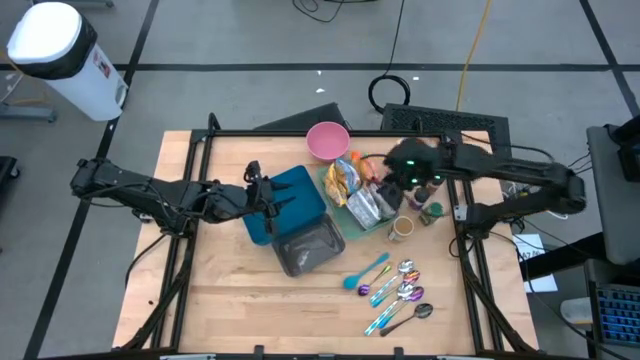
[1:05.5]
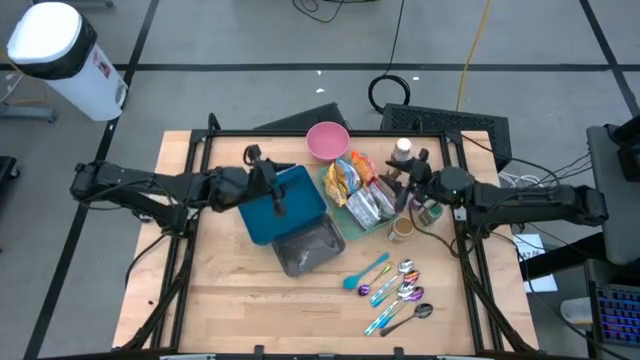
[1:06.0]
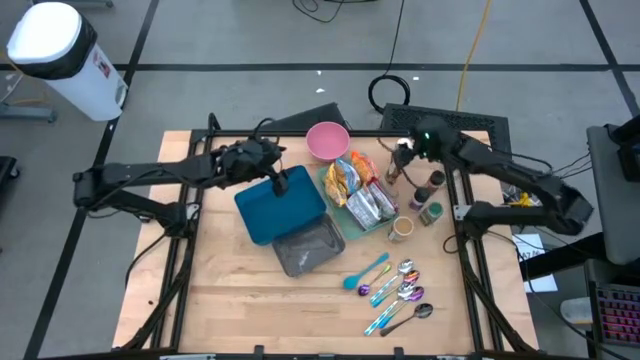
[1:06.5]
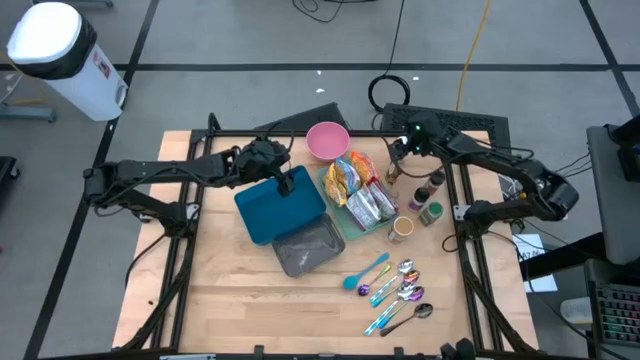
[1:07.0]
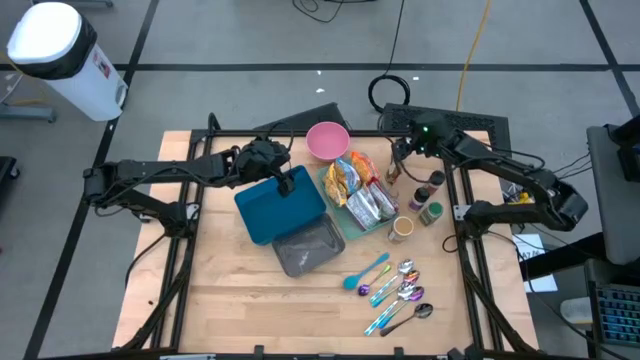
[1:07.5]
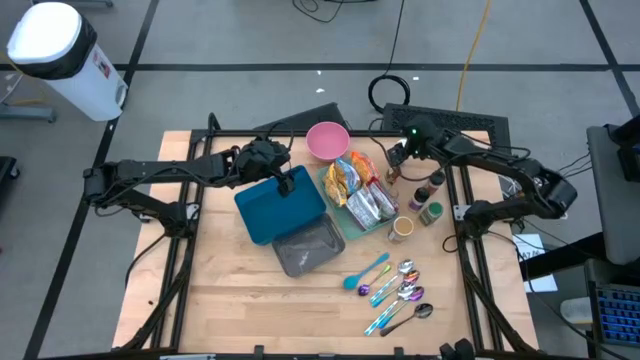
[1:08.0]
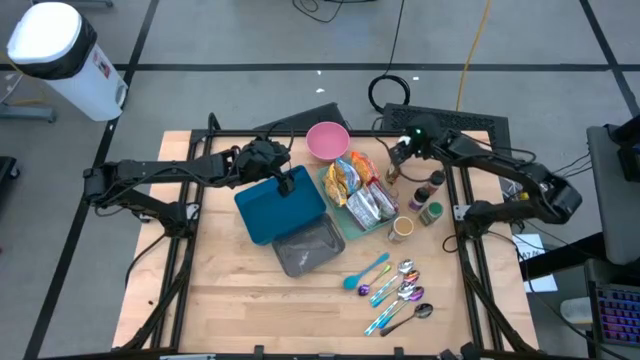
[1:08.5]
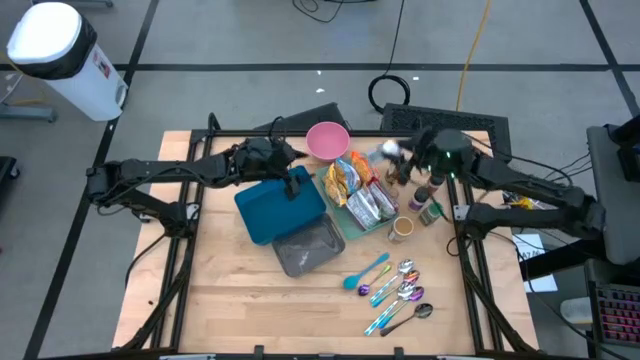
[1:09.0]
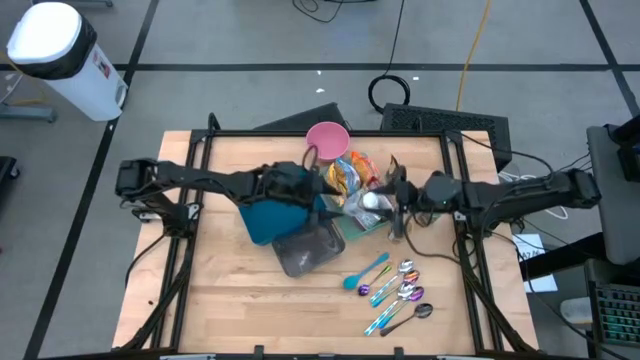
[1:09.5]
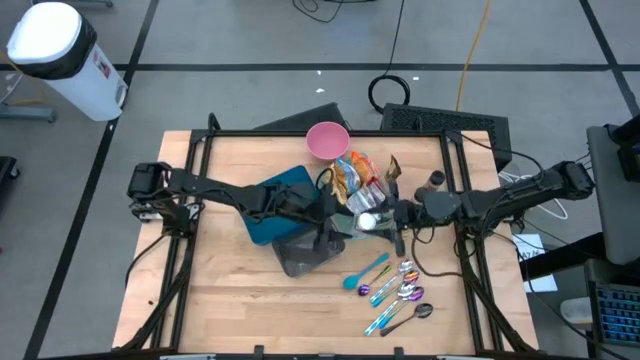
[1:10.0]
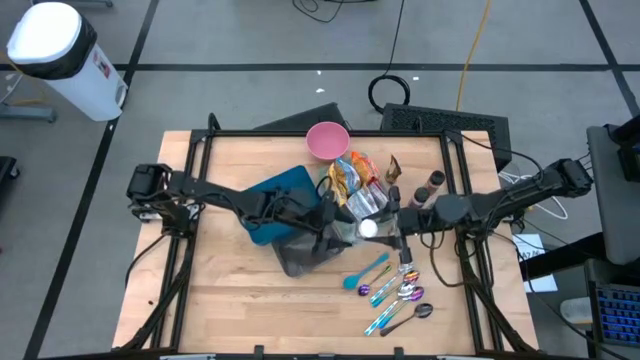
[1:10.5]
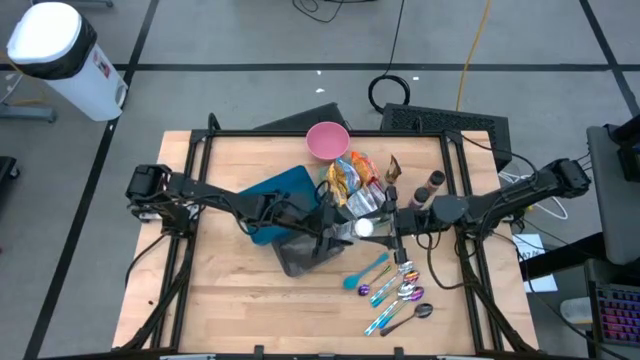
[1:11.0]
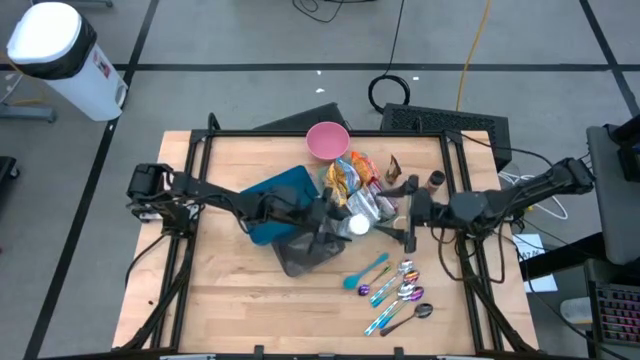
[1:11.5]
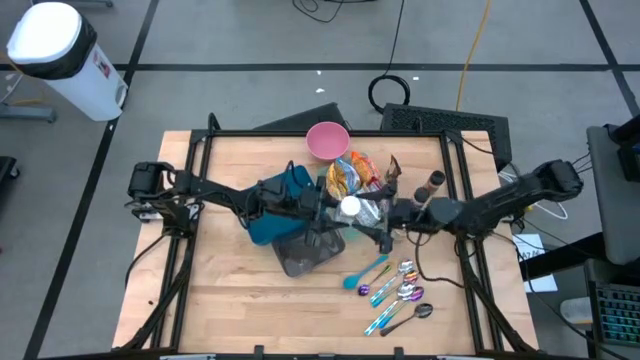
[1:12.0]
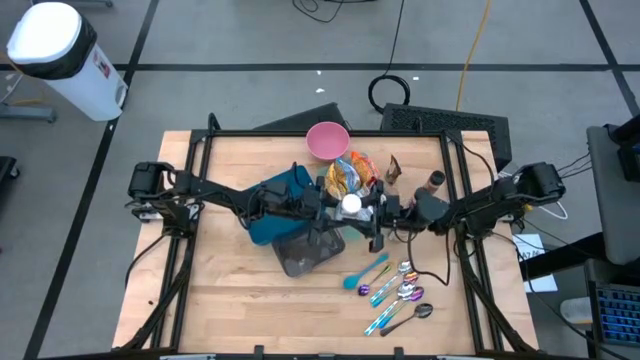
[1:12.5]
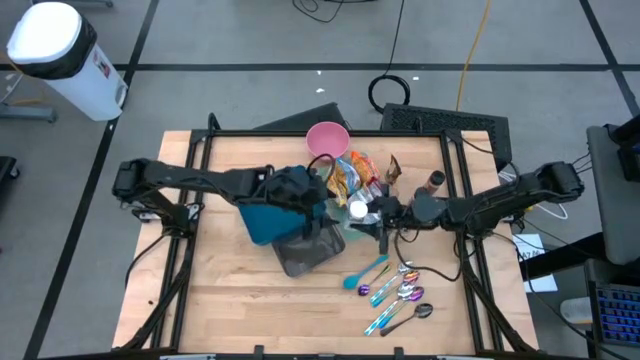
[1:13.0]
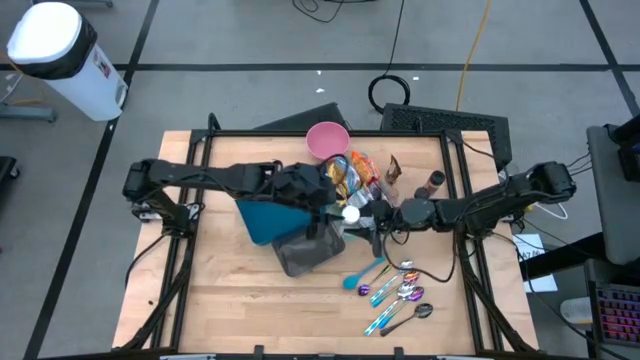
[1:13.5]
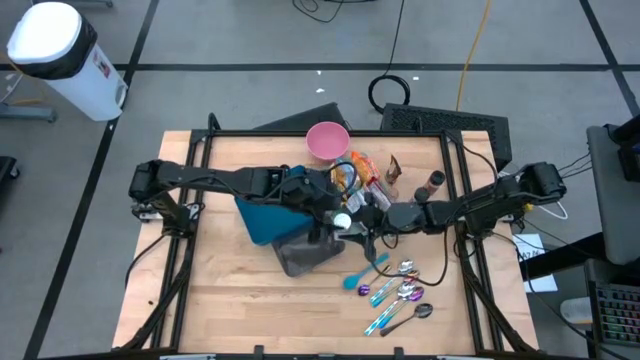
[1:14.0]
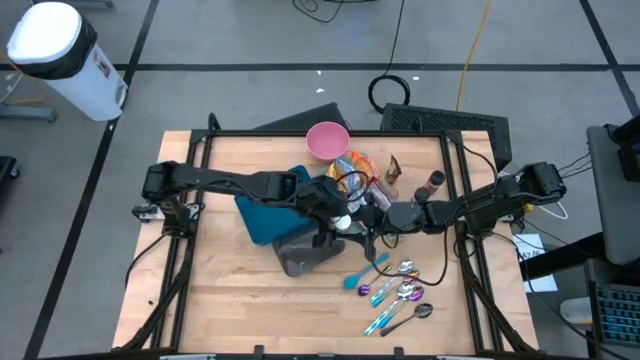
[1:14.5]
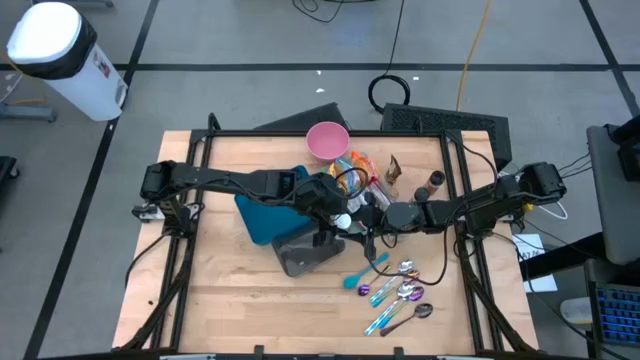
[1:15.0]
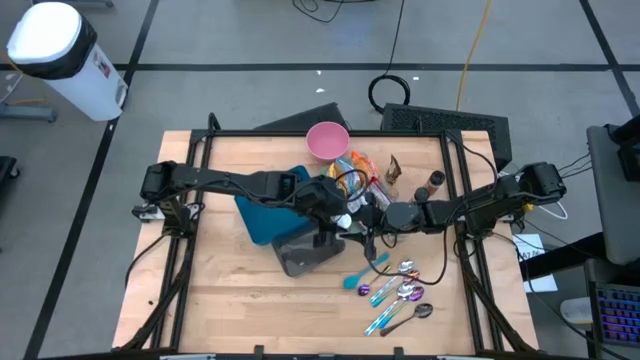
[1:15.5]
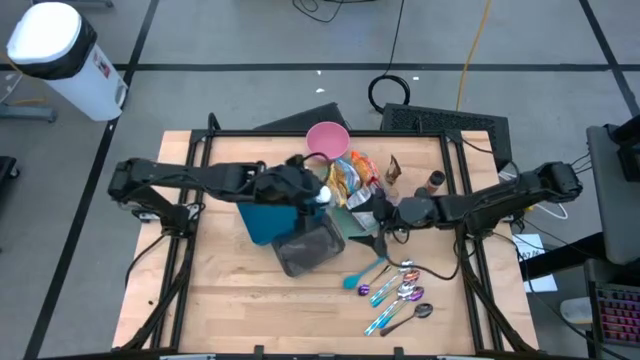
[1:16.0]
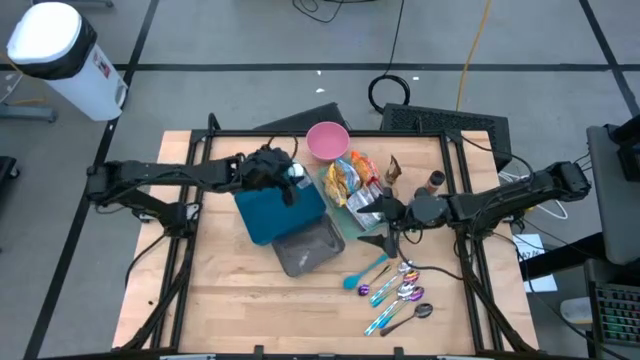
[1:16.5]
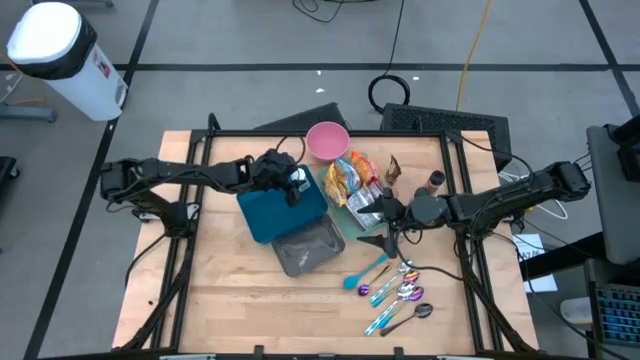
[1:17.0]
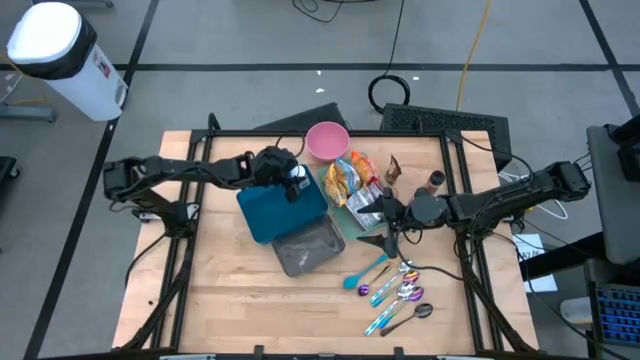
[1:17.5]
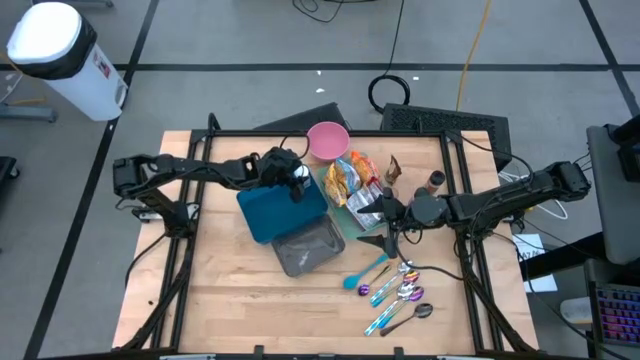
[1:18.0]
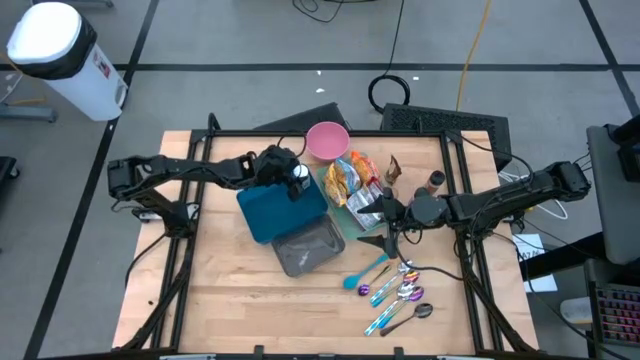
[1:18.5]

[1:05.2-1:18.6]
Task: Pick & Place Food Item
Put the white seasoning bottle into the blue bin

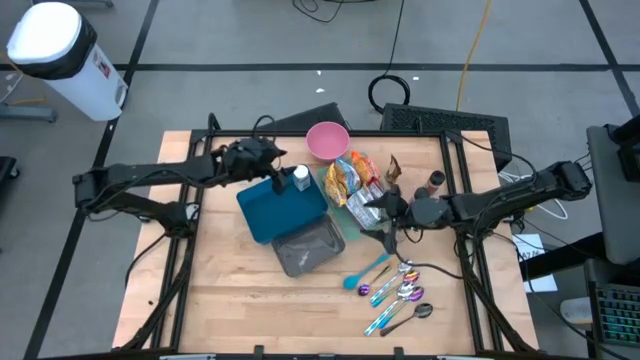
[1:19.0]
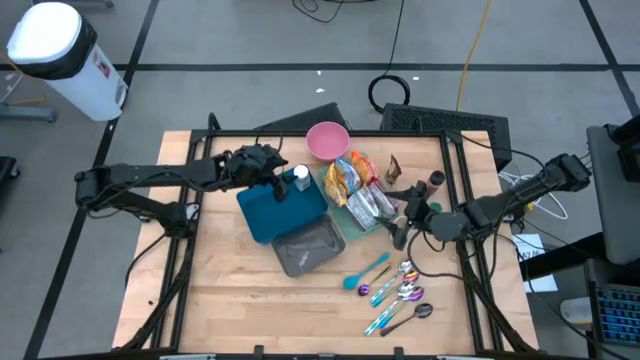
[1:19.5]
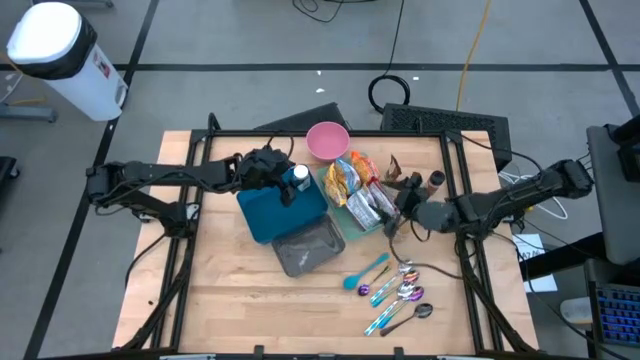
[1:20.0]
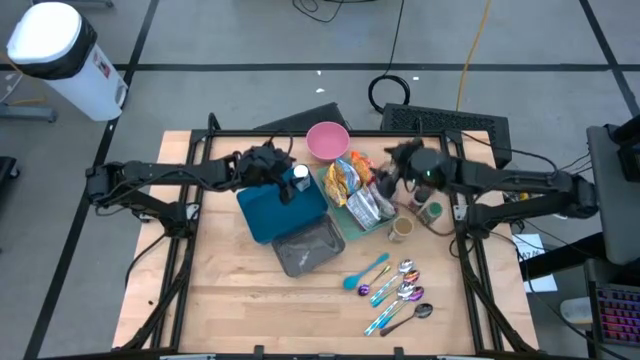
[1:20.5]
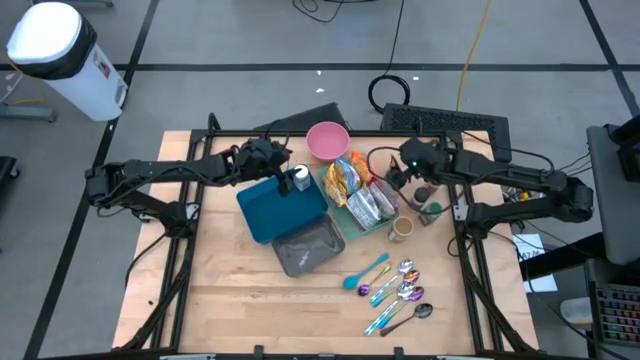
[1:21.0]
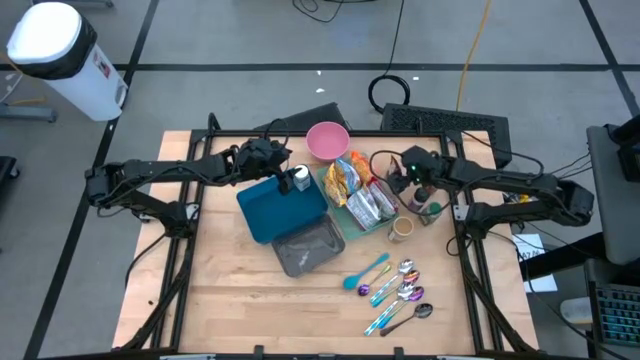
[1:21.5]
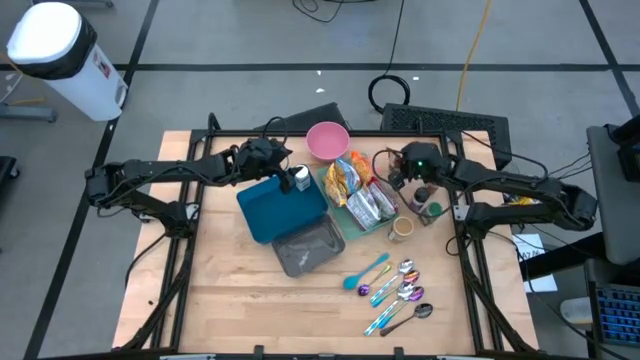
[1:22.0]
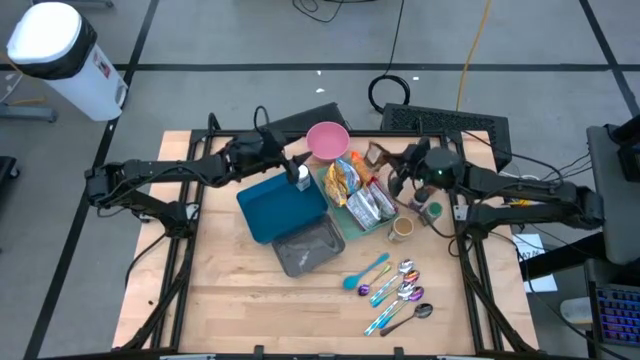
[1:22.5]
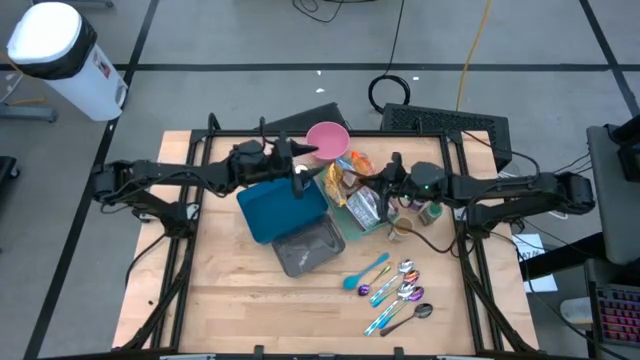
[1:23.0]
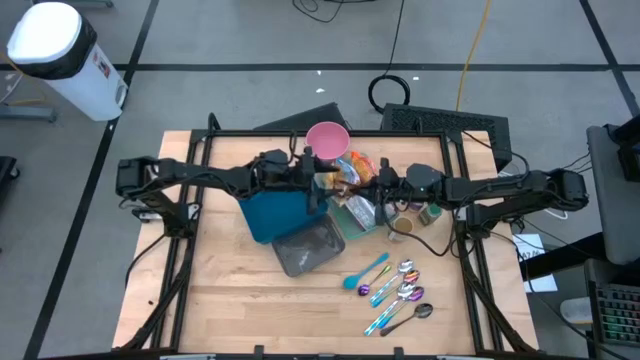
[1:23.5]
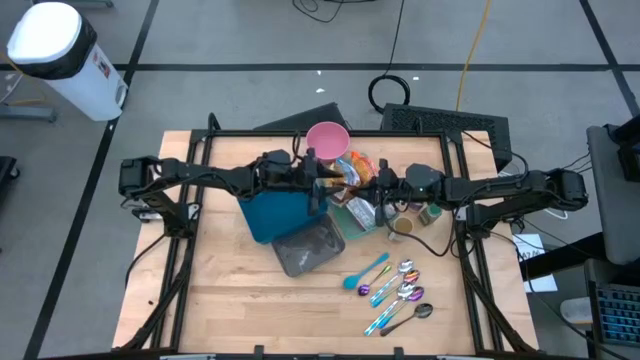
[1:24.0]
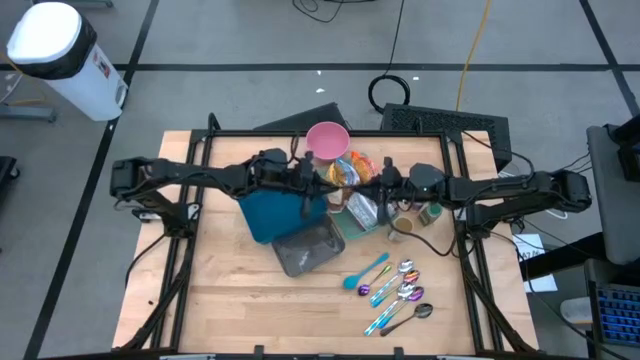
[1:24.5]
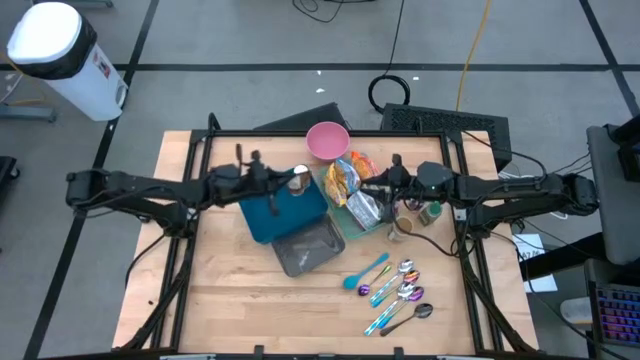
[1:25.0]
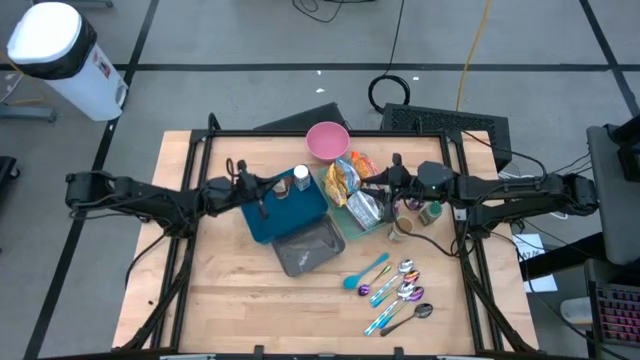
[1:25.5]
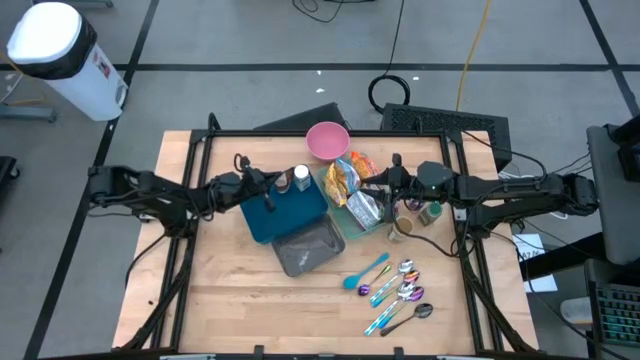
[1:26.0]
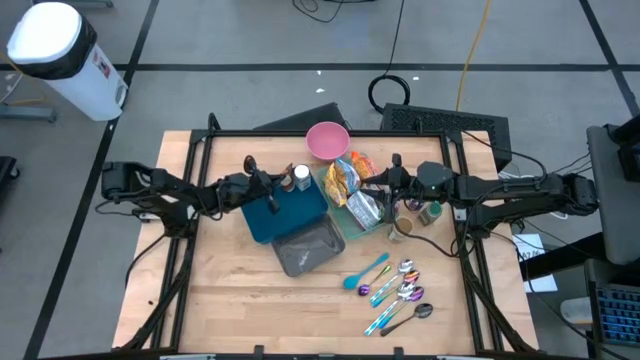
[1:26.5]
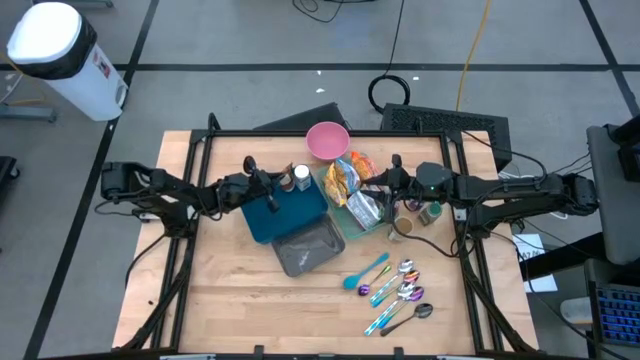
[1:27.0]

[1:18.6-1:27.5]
Put the orange seasoning pack into the blue bin
